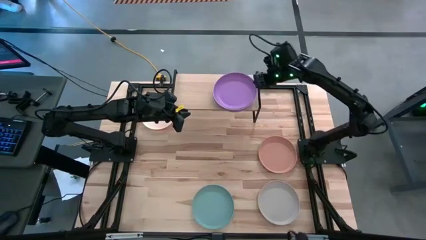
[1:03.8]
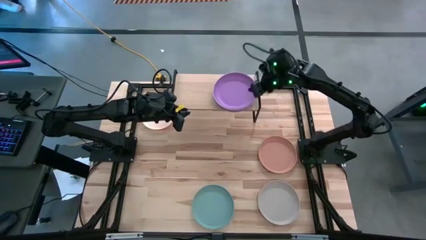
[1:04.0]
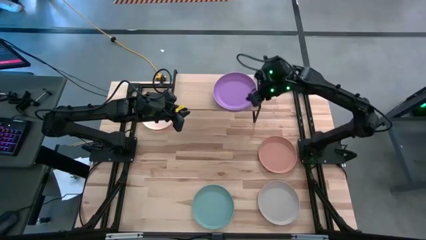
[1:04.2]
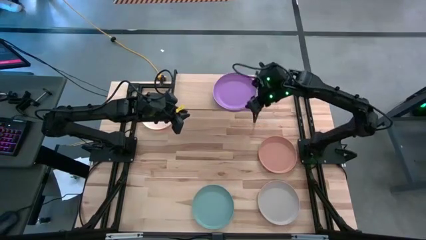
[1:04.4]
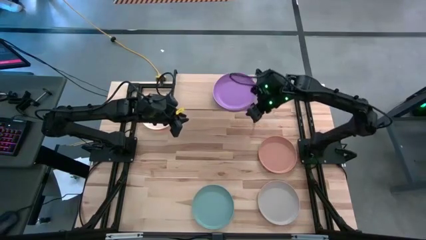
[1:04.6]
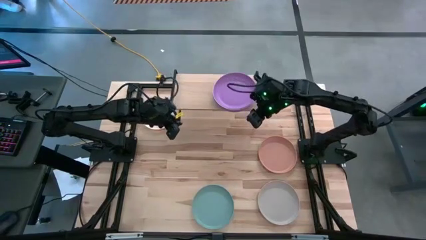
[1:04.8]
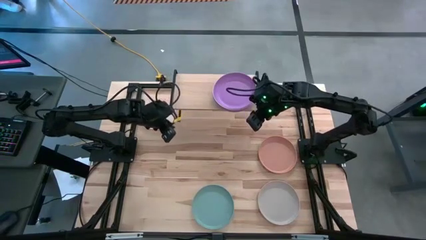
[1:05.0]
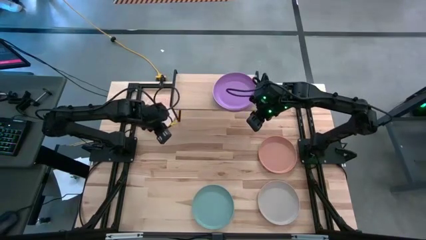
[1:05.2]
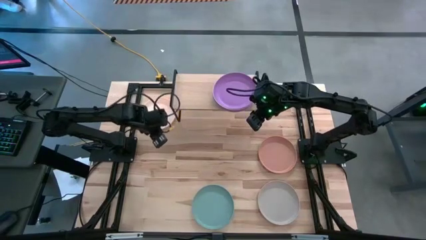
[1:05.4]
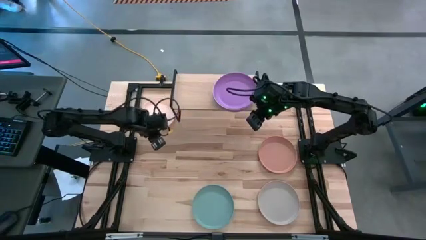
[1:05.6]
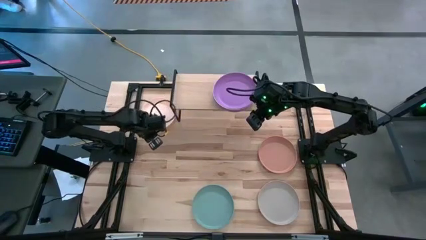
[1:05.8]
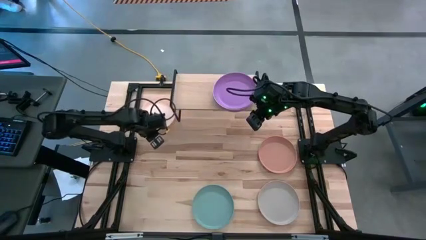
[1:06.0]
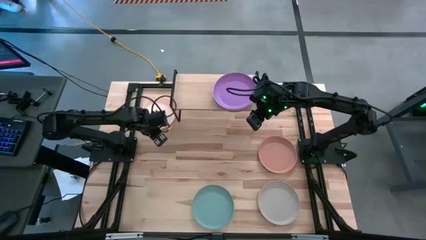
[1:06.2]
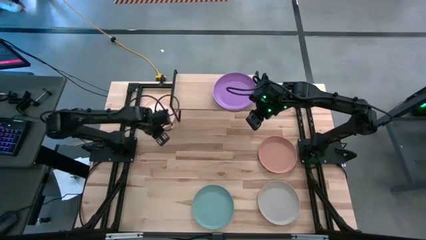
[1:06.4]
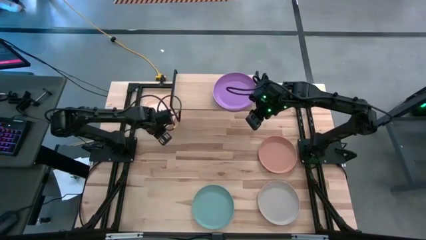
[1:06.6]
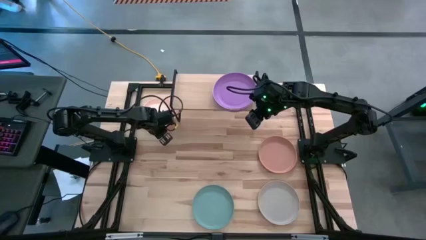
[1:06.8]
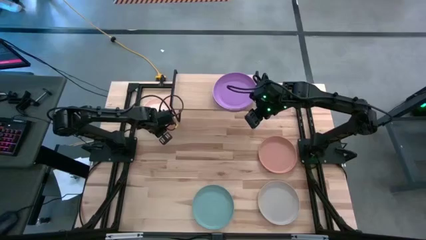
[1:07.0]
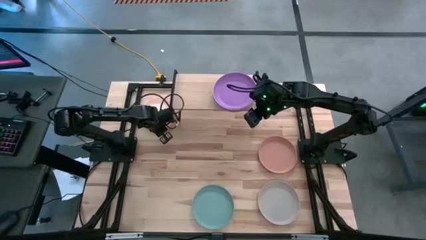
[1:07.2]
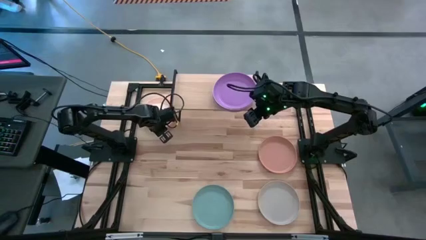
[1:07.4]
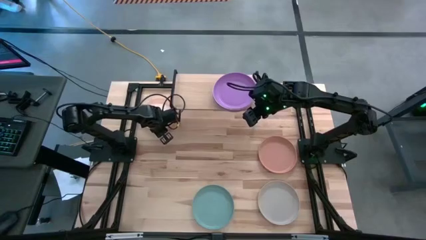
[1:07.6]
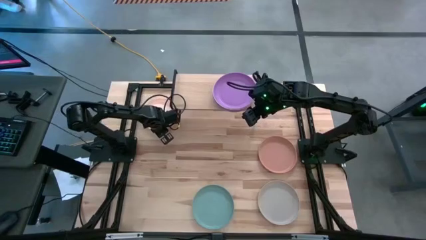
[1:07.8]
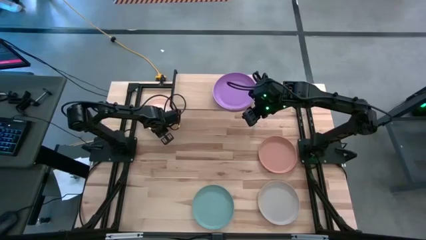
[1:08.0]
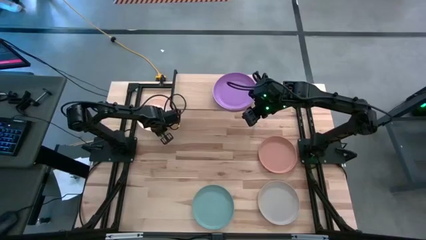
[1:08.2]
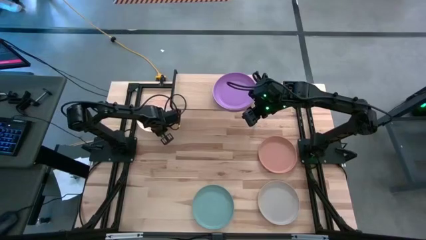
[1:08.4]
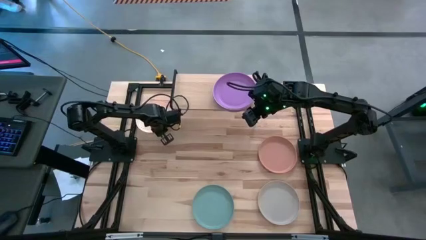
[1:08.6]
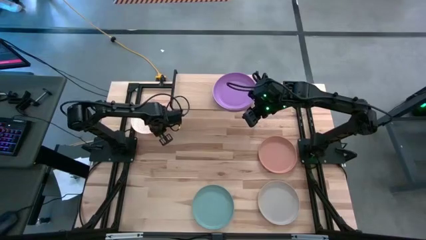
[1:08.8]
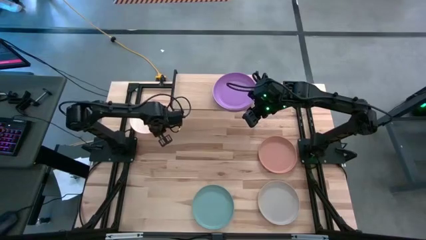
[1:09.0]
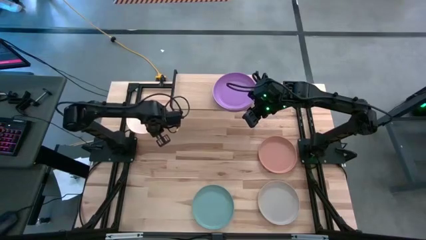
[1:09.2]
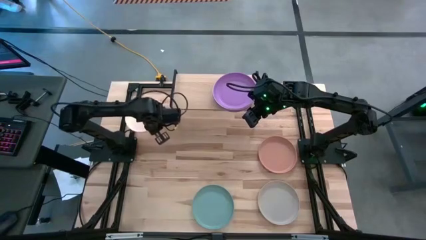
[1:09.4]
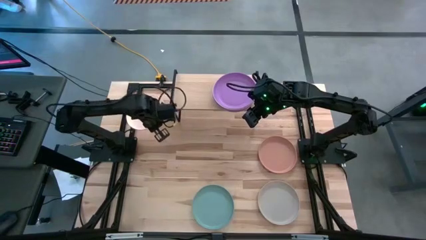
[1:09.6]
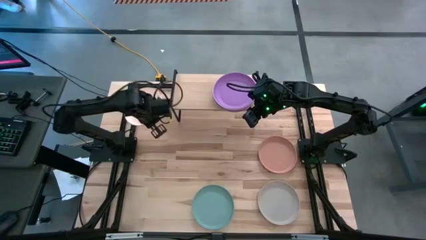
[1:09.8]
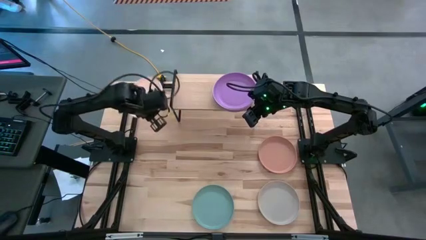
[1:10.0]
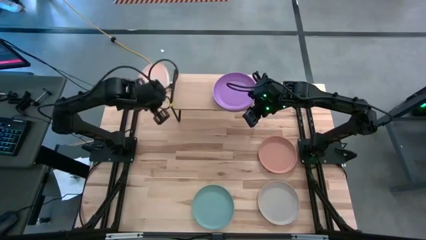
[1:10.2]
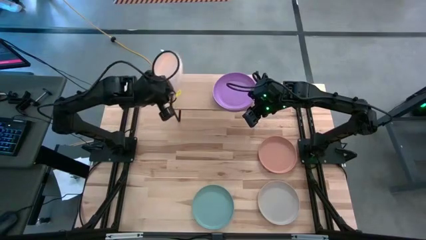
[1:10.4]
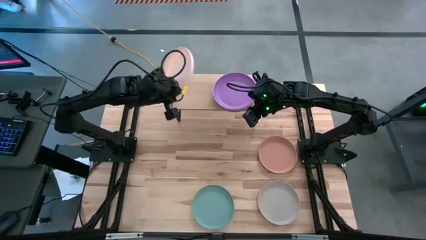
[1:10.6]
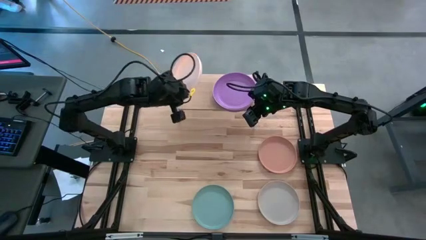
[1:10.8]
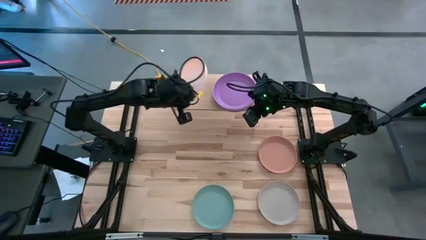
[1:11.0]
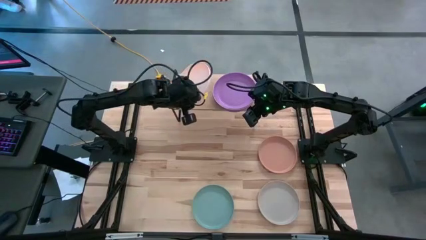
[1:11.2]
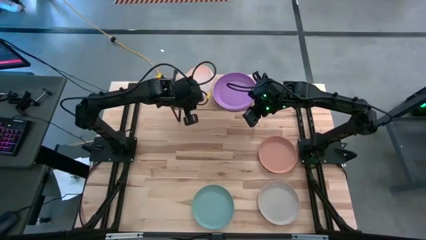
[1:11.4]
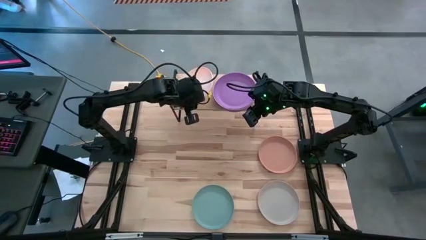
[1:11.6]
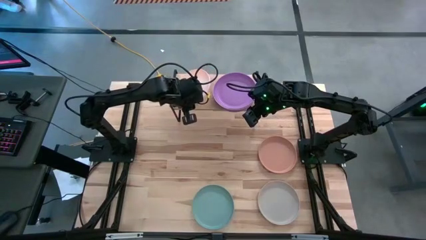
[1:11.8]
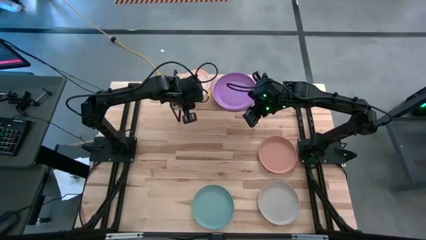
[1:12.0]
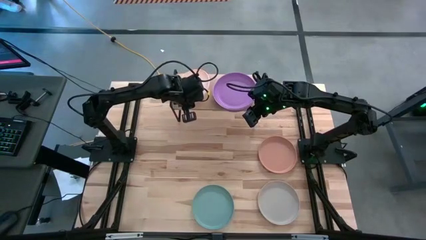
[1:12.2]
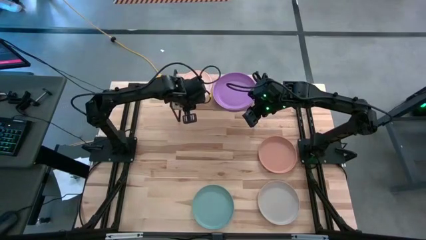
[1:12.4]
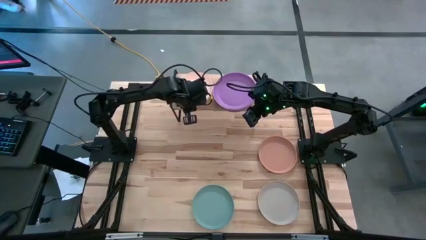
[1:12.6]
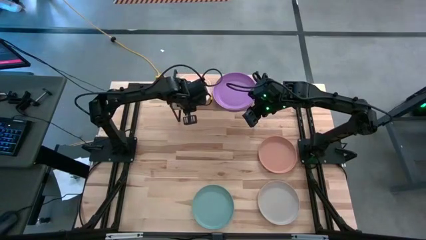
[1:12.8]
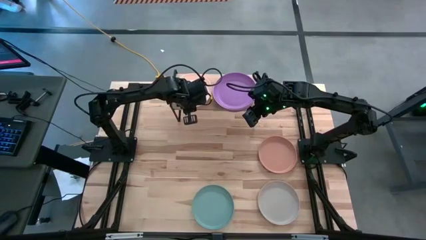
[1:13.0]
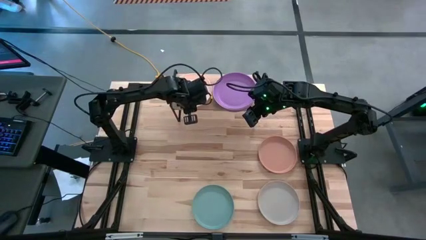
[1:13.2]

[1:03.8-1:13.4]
Task: Place and stack plates onto a shelf
Put the light brown plate on the shelf

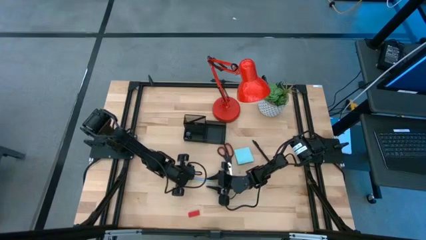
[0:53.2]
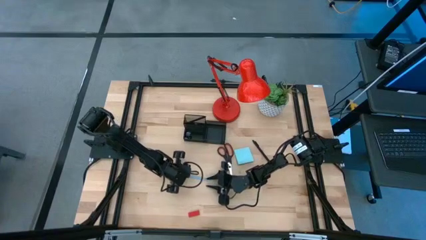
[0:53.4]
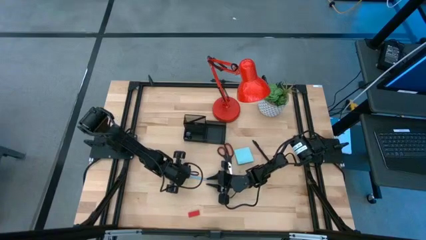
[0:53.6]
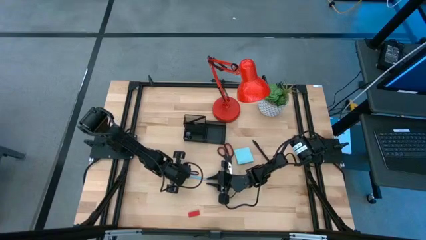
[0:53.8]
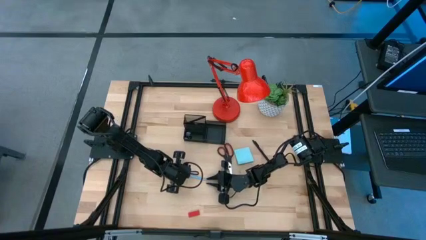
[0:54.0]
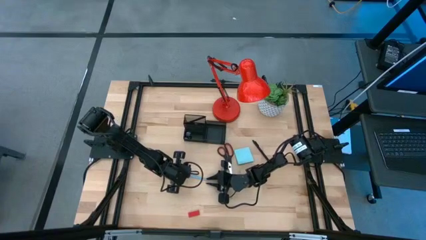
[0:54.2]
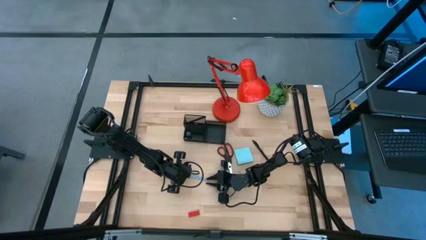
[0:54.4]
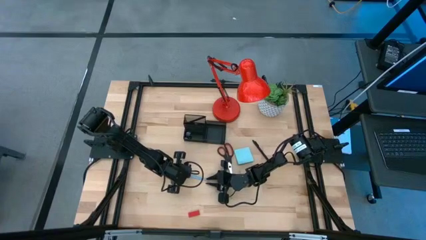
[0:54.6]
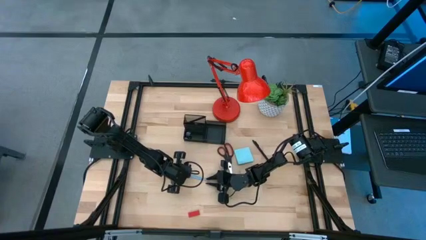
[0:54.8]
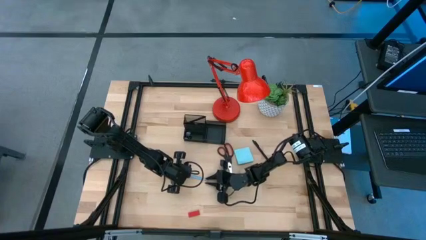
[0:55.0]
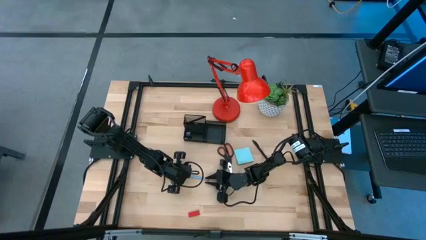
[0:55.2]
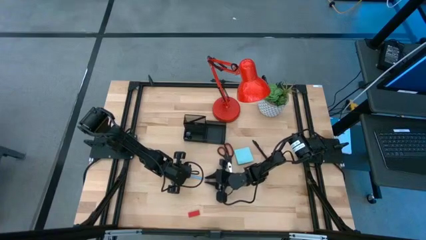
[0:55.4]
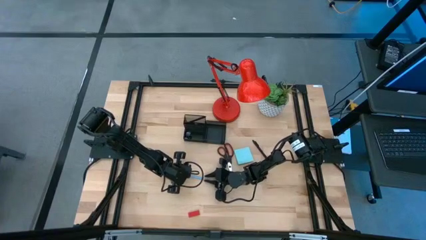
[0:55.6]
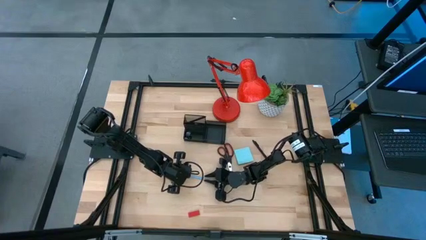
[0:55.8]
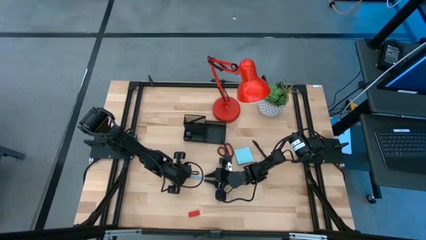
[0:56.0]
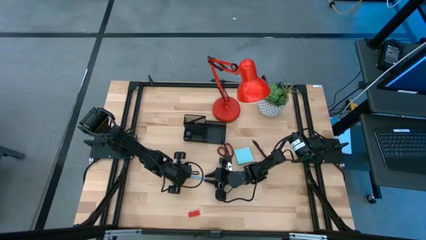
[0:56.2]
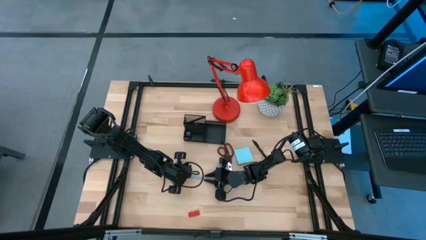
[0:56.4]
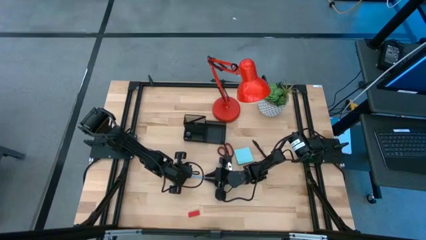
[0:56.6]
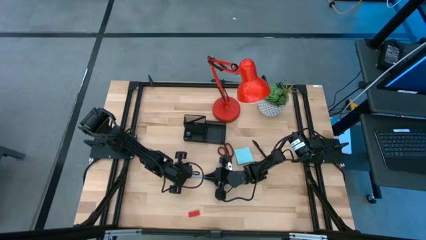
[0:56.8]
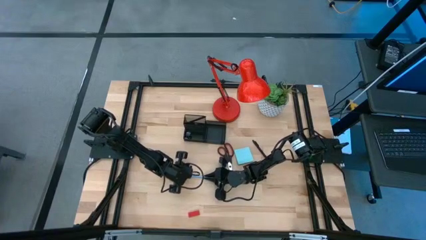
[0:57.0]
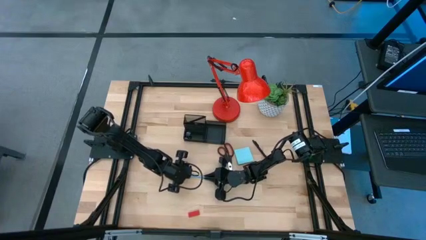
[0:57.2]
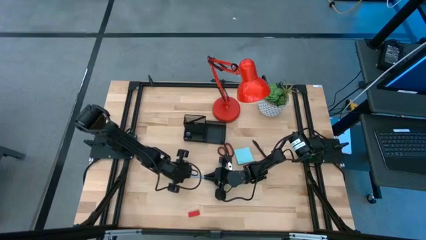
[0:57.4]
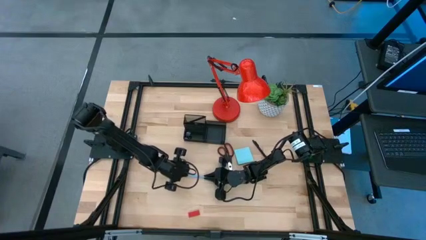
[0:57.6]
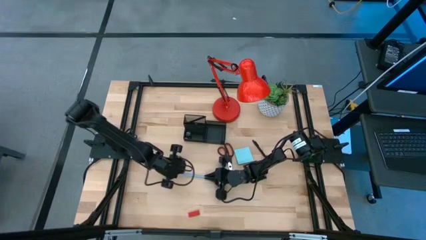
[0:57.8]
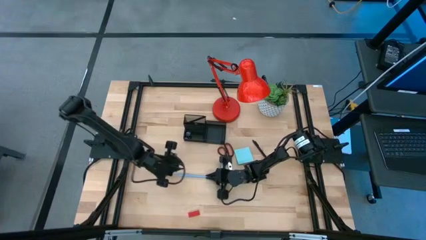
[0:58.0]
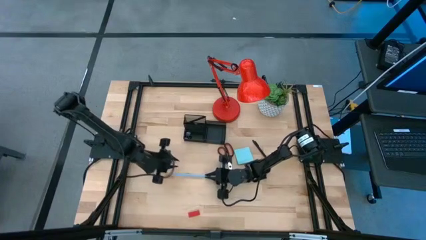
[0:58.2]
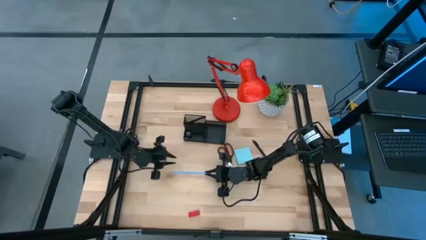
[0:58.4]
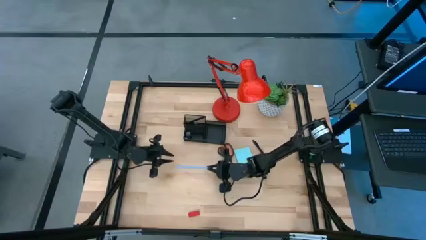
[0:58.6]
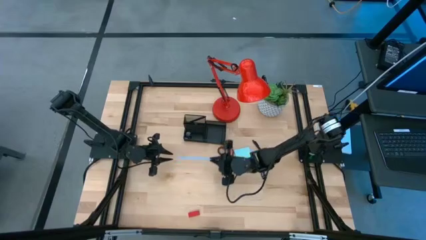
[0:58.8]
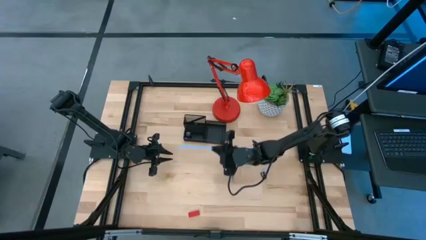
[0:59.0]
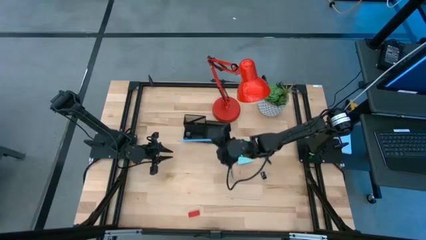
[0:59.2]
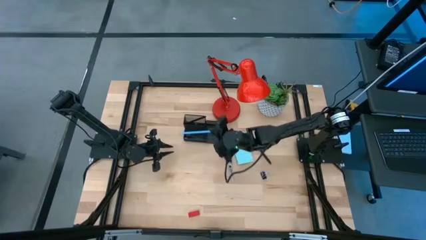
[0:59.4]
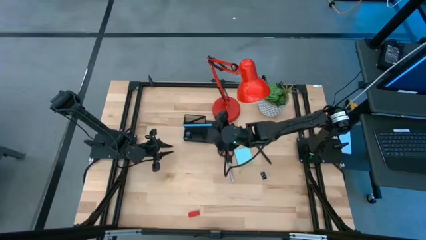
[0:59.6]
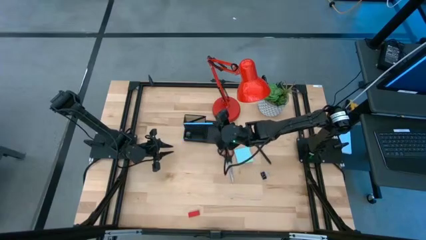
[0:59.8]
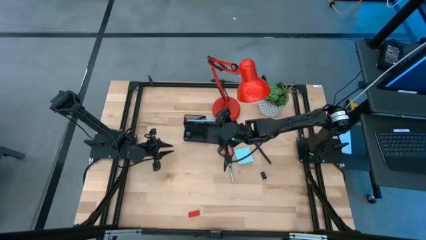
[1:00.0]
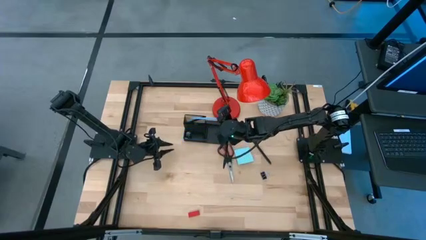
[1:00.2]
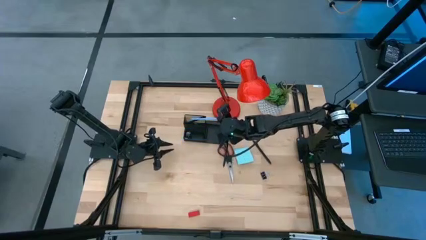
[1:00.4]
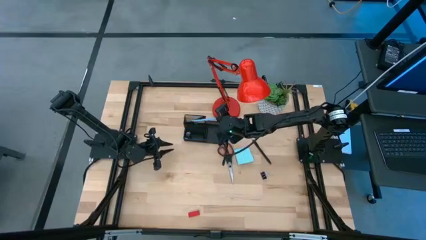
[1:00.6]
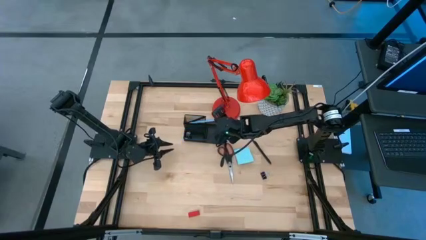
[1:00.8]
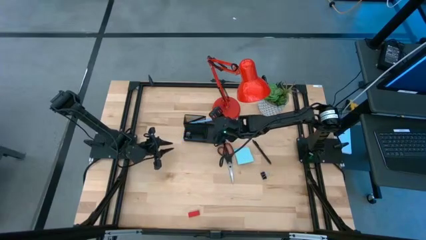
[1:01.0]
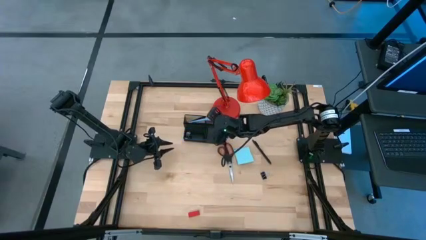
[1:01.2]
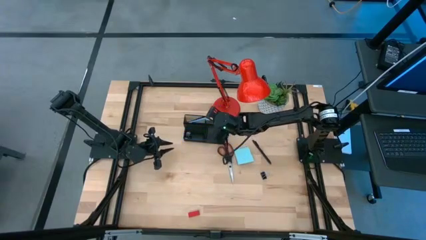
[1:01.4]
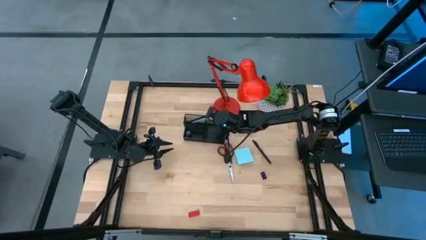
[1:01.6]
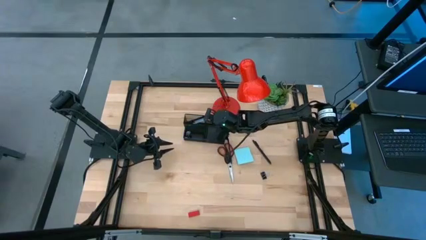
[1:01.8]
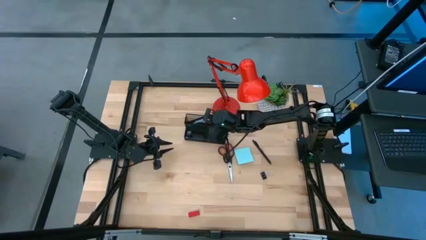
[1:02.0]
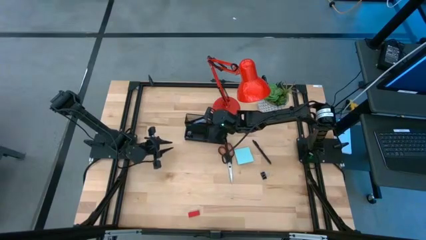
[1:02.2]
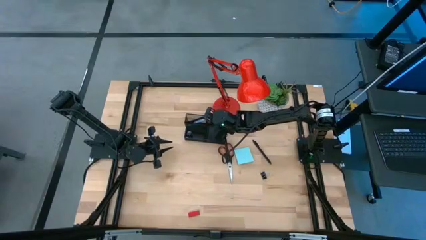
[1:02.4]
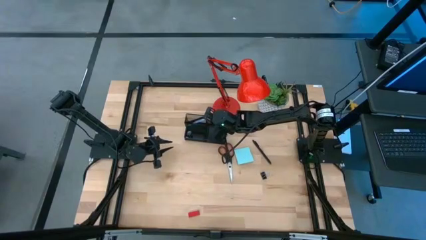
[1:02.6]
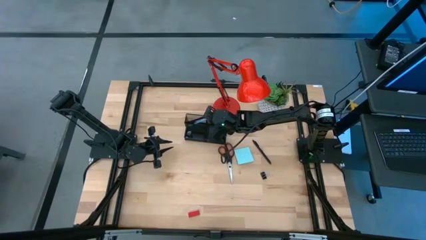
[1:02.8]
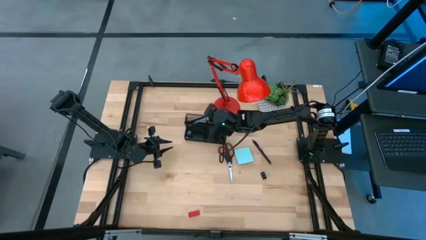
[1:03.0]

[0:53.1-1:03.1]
Task: Pick and place office supplies into organizer
Put the blue pencil into the black desk organizer
